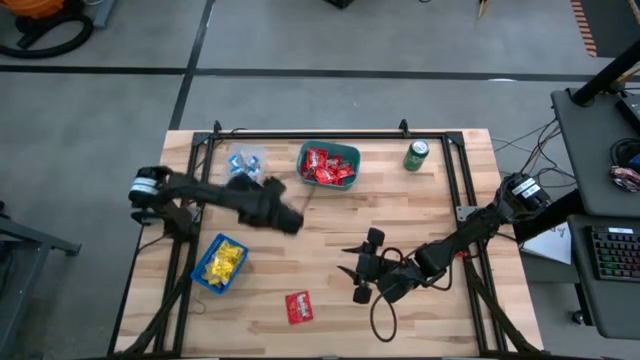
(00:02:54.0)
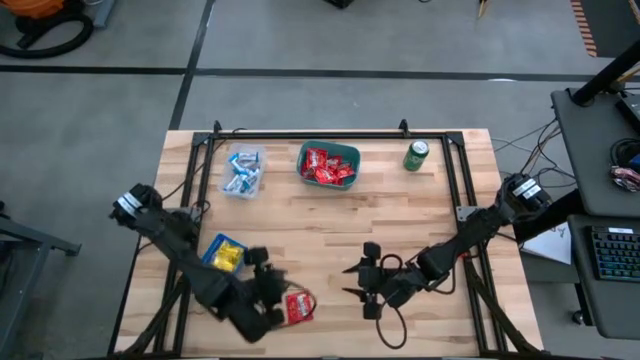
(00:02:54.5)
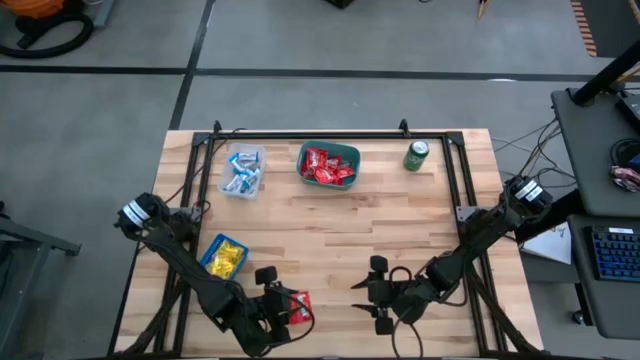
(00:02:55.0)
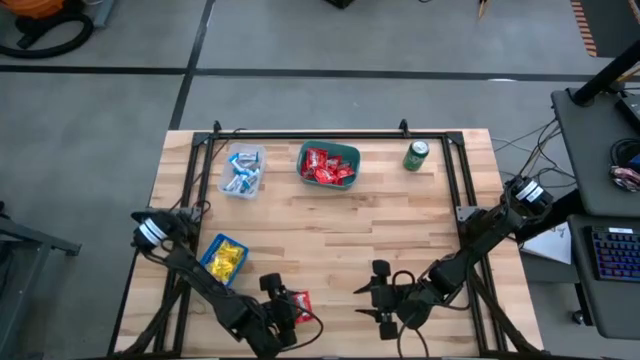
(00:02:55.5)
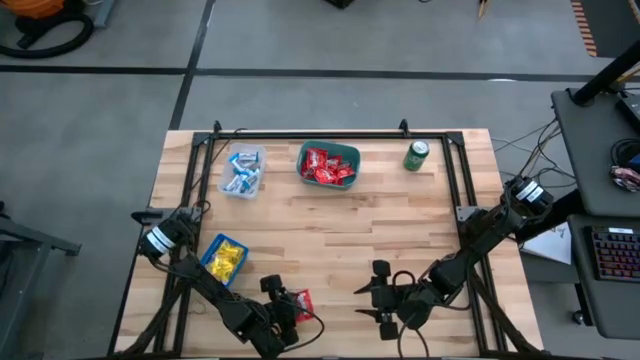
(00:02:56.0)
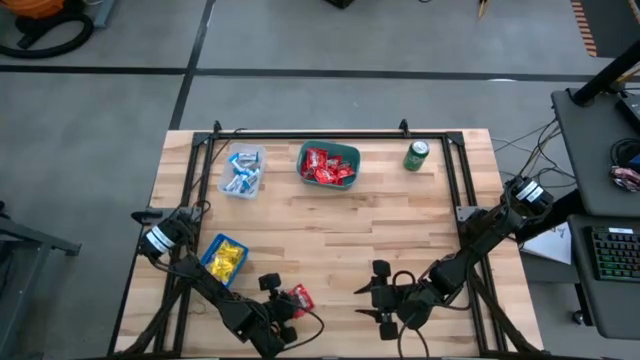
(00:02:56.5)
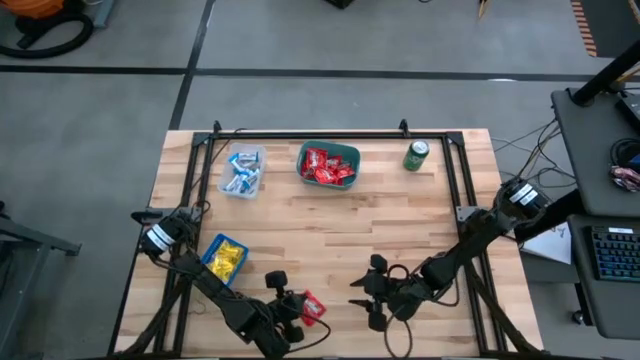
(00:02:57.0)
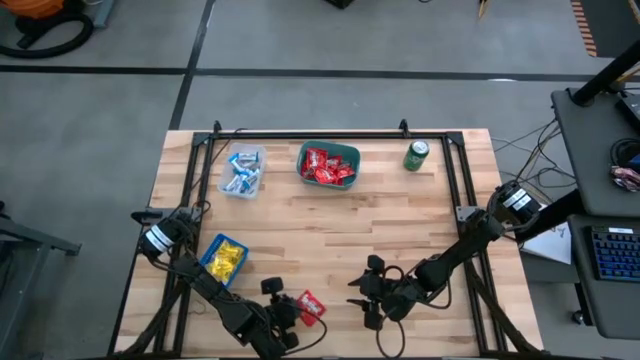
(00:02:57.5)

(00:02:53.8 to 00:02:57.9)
Task: Sort candy
Put the red candy into the green bin

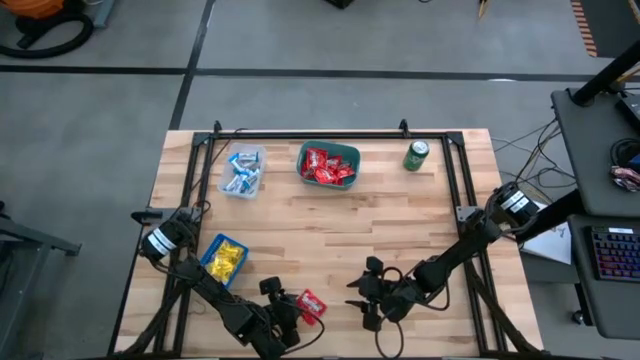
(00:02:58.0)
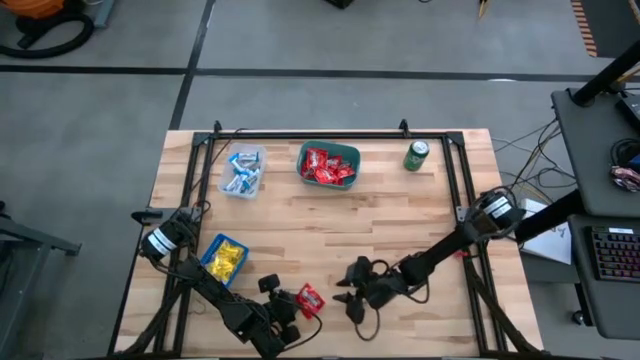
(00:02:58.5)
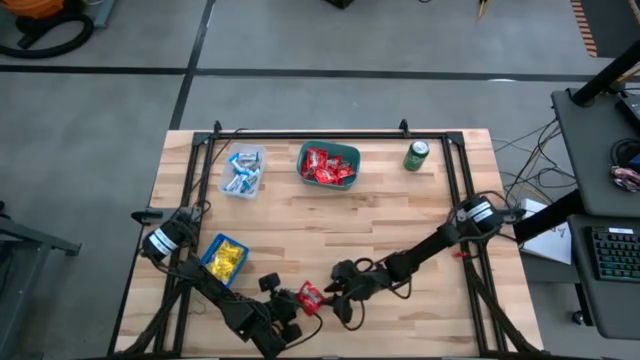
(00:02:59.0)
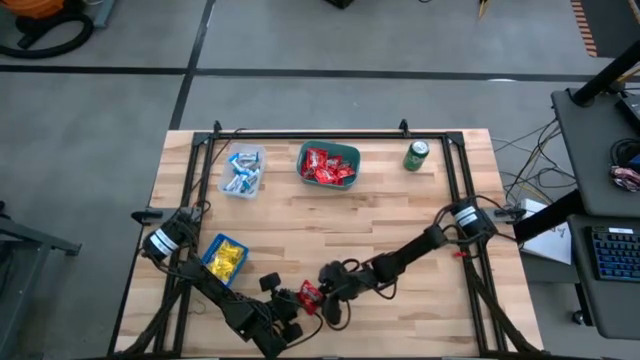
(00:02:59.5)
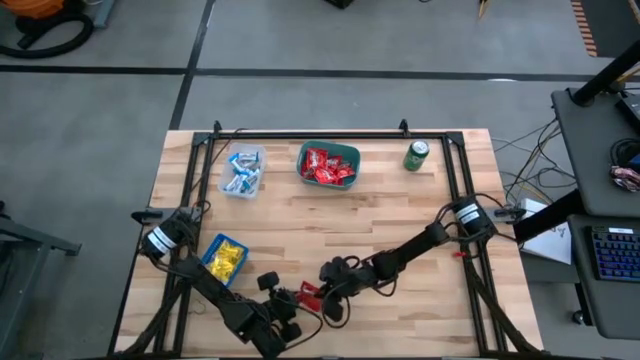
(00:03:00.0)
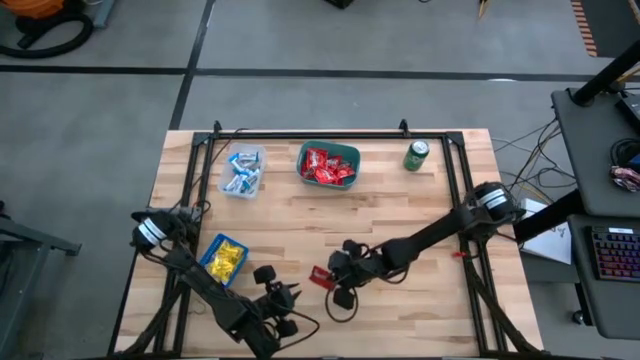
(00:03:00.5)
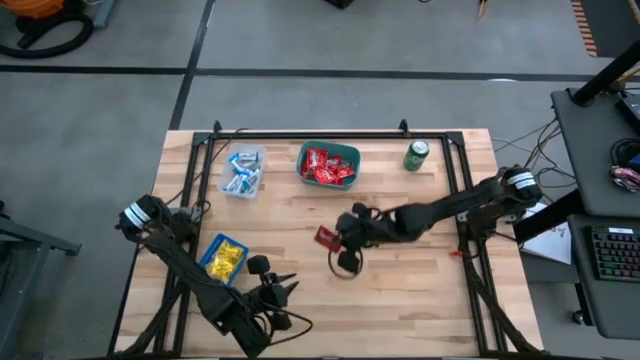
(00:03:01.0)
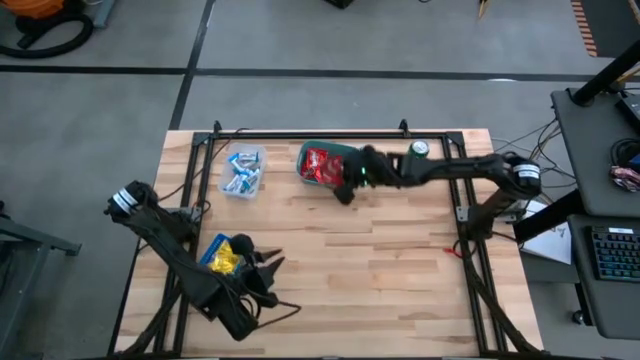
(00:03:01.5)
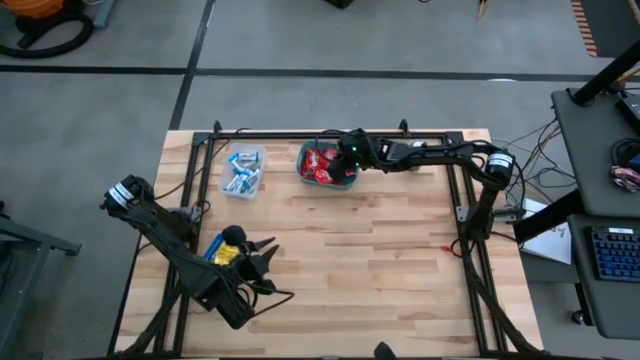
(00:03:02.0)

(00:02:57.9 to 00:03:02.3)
Put the red candy into the green bin

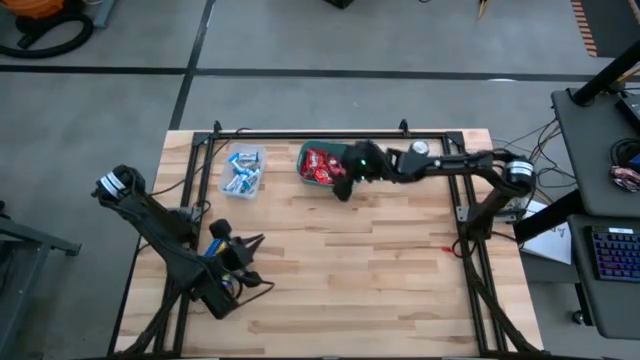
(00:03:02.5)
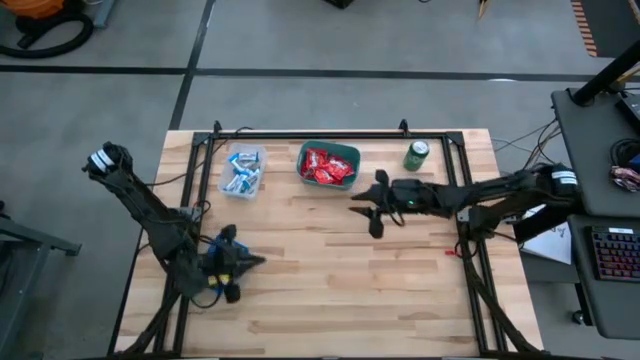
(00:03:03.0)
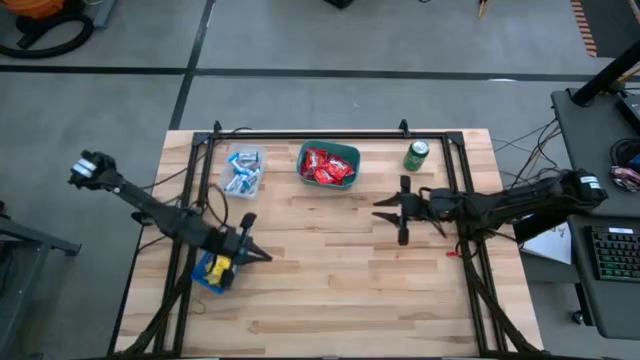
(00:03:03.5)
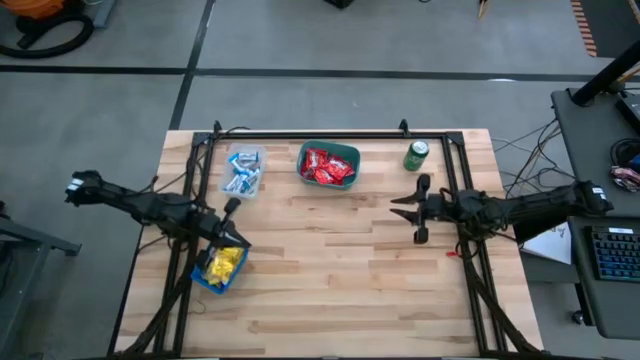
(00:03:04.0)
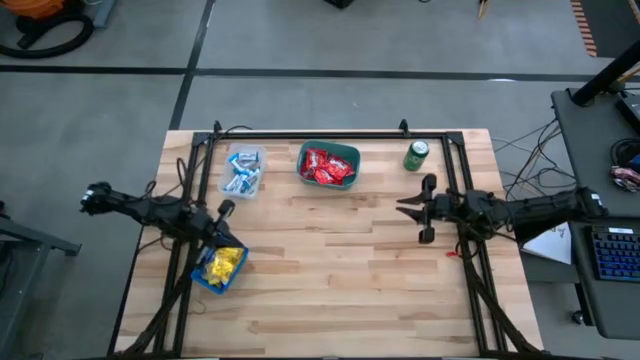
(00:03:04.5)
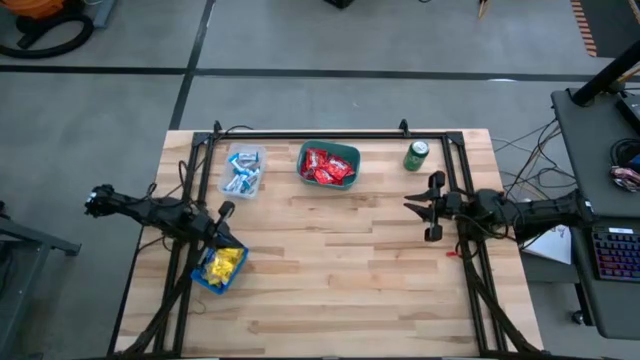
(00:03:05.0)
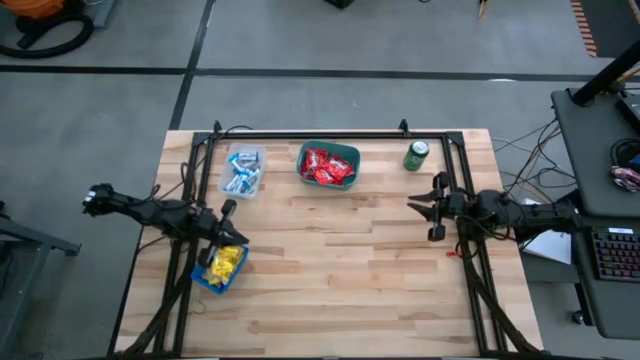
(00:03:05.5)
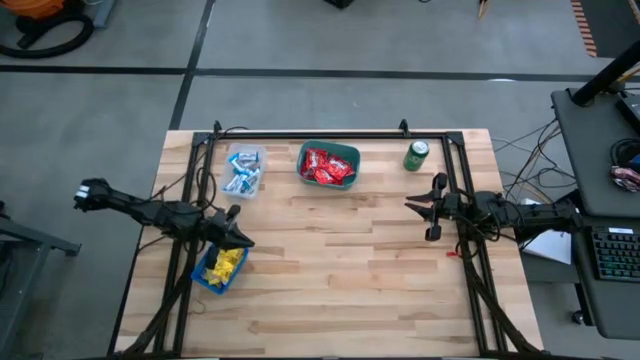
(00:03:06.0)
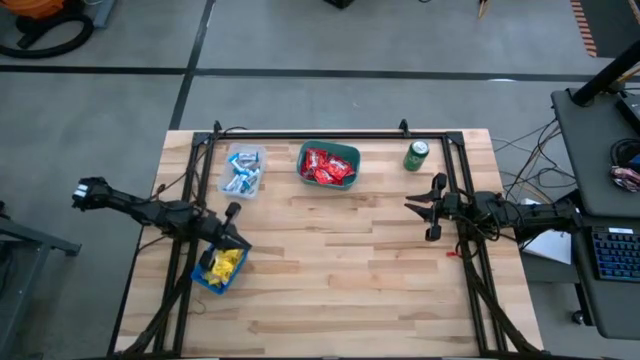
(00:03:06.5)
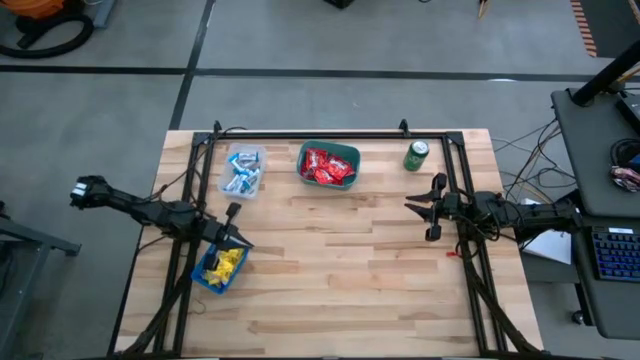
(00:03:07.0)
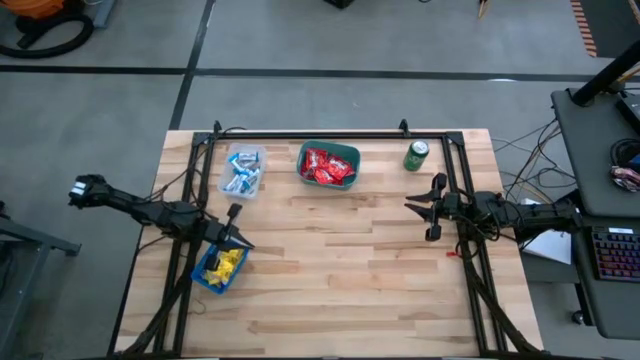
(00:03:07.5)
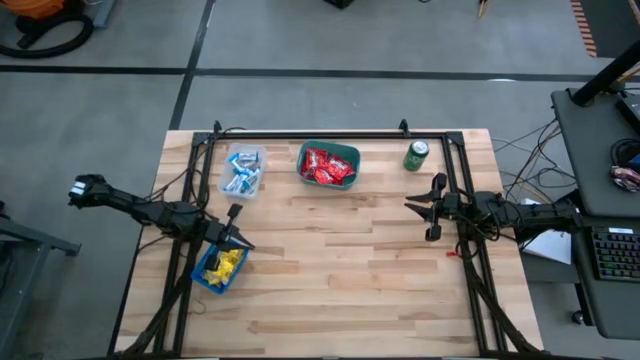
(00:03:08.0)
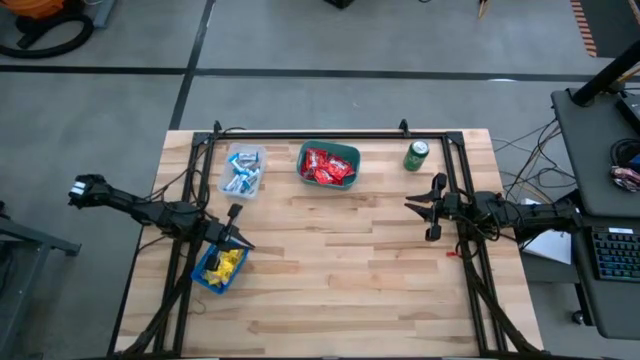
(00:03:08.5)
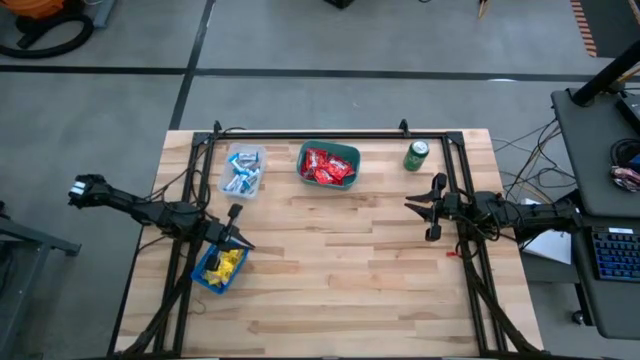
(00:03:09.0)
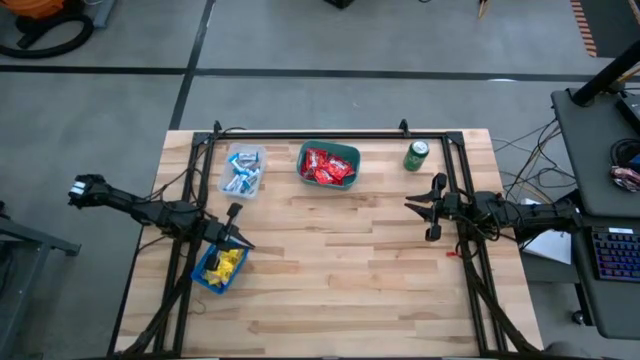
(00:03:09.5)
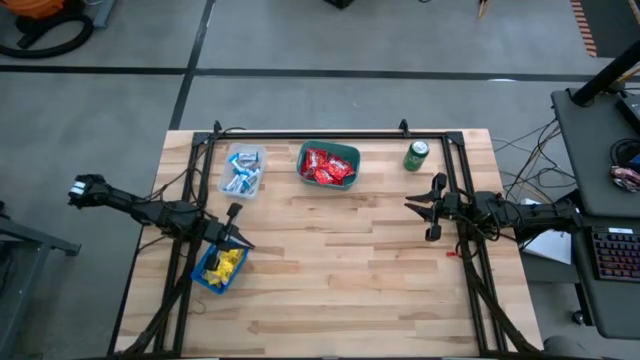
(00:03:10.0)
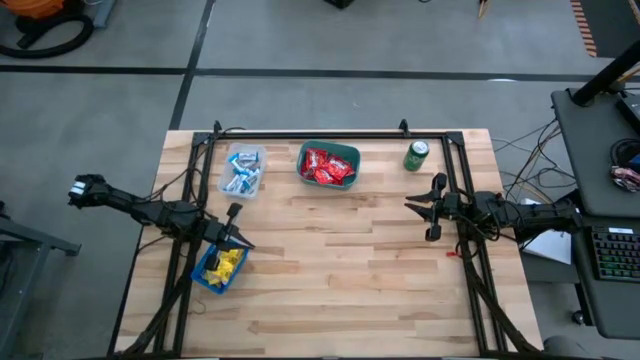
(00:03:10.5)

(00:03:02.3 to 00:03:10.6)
Return to Home Position

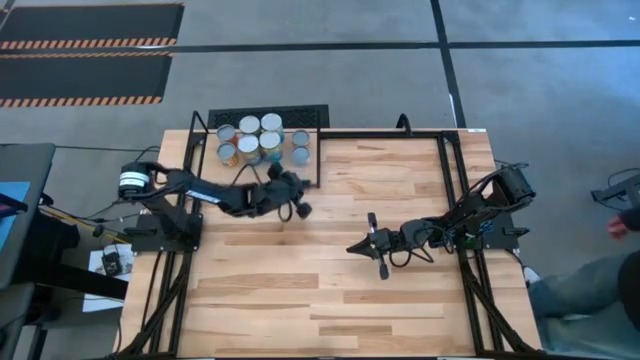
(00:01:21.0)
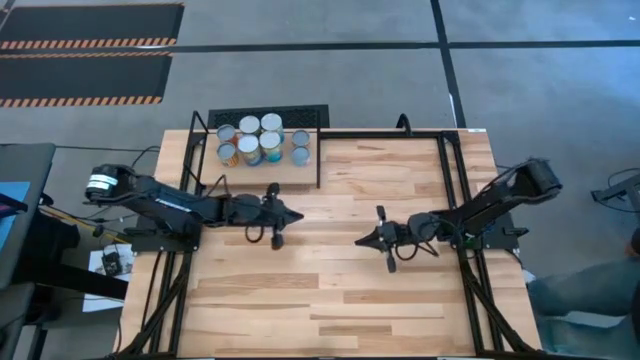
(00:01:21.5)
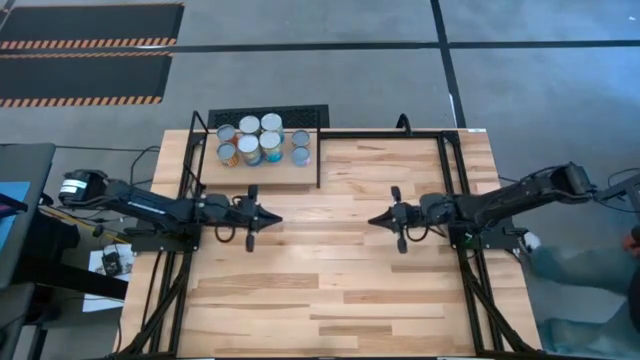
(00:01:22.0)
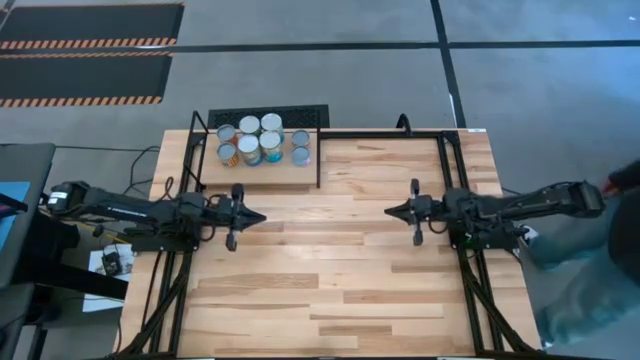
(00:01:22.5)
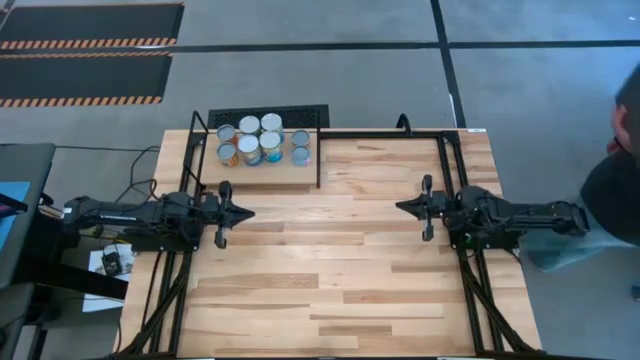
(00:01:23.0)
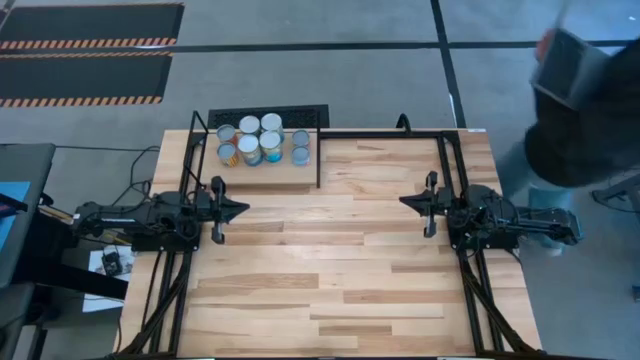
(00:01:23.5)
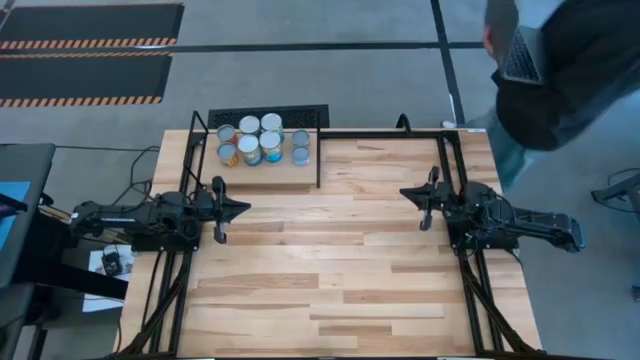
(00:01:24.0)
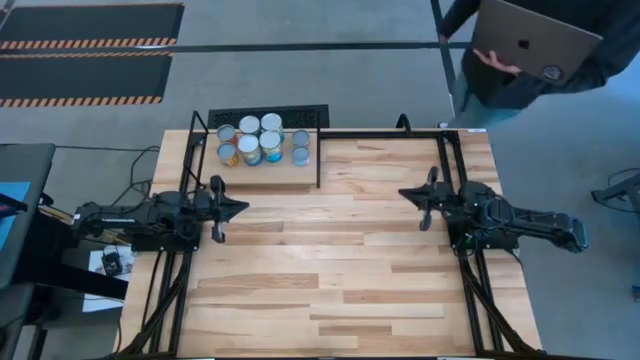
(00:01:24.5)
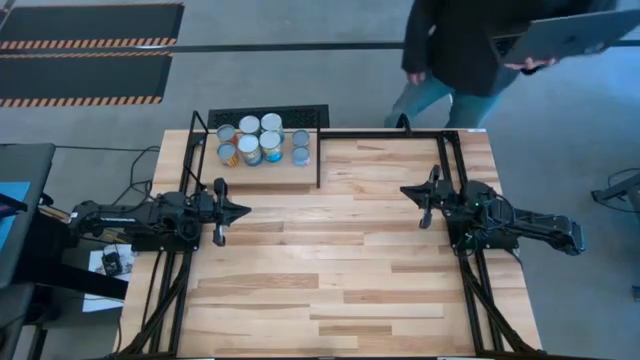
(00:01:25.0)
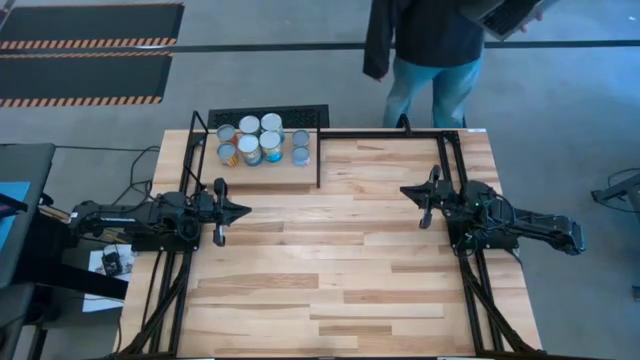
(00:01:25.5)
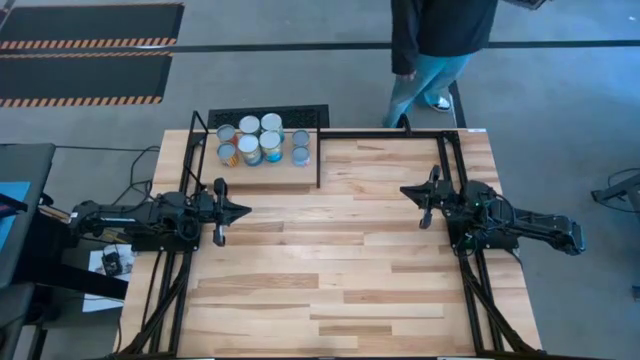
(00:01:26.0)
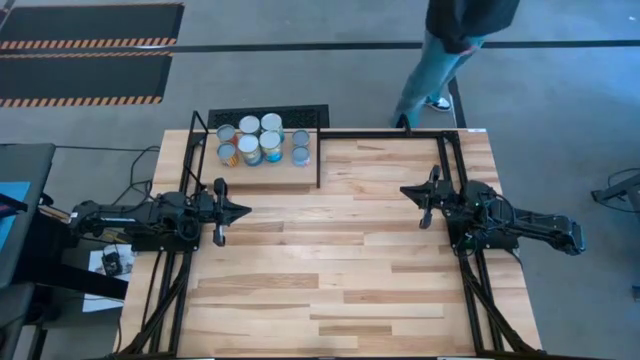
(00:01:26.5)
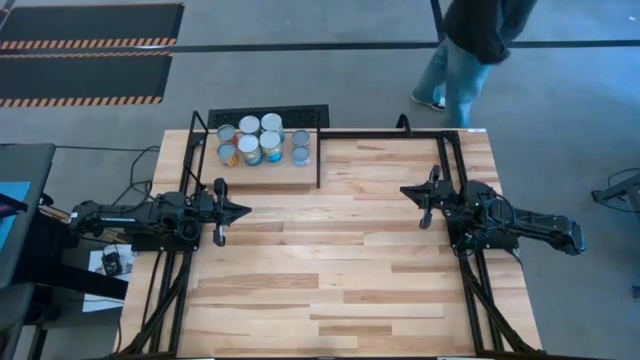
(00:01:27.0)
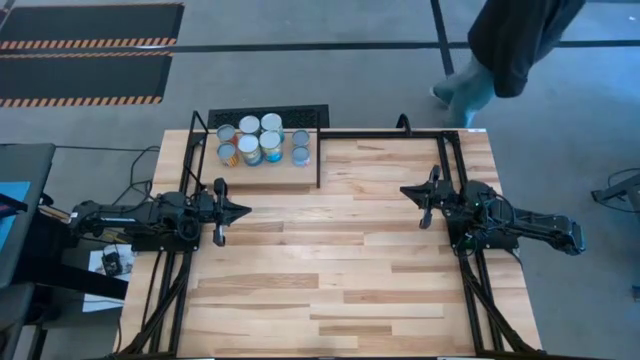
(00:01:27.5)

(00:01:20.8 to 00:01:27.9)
Task: Pick and place cans onto a shelf
Return to Home Position
